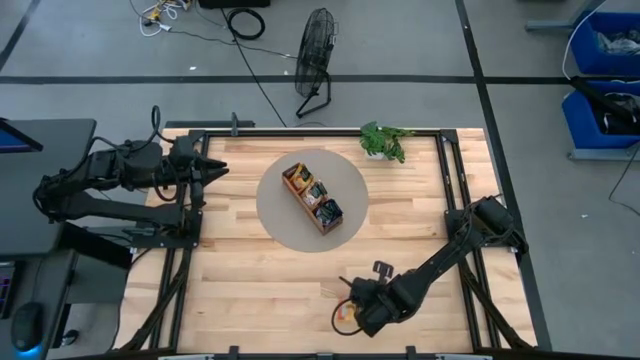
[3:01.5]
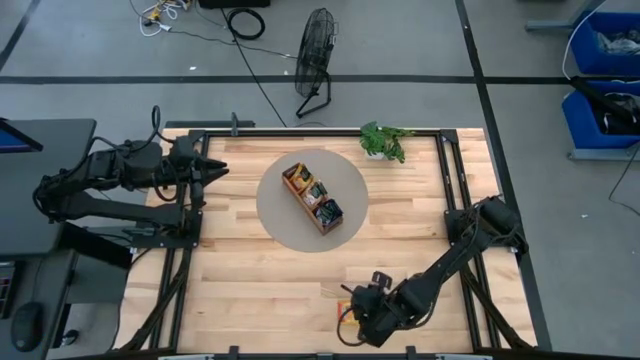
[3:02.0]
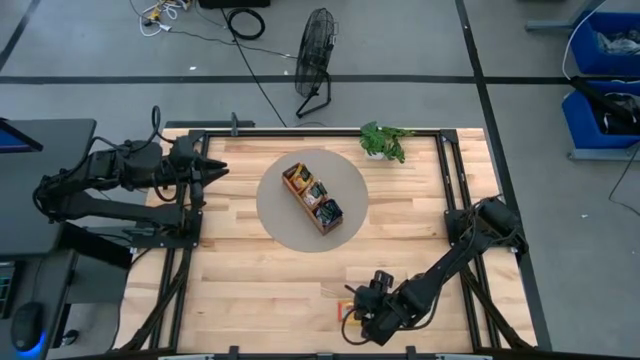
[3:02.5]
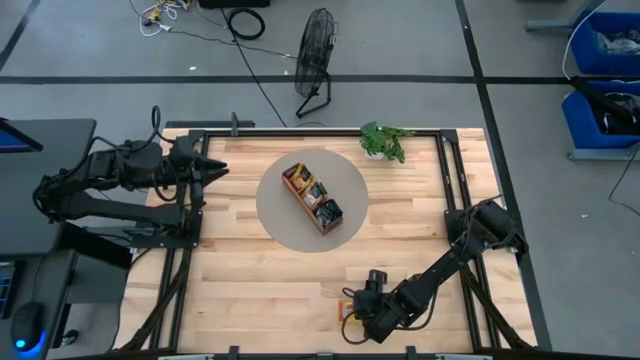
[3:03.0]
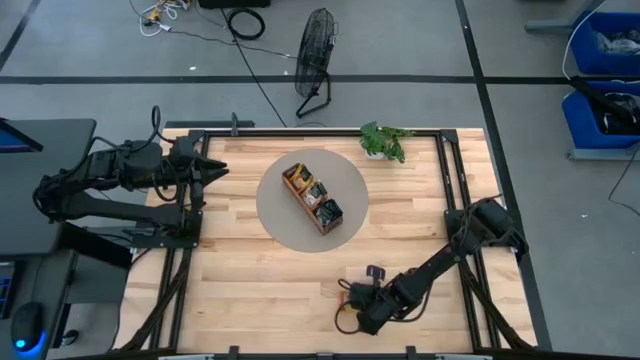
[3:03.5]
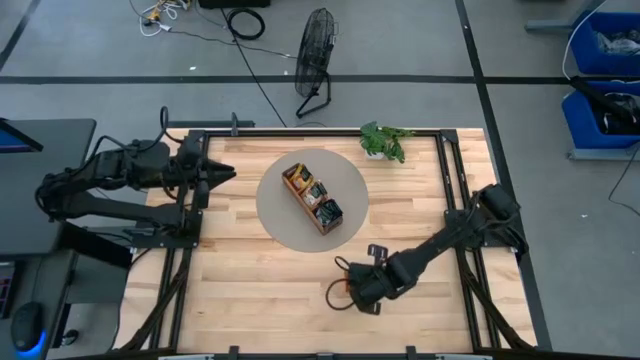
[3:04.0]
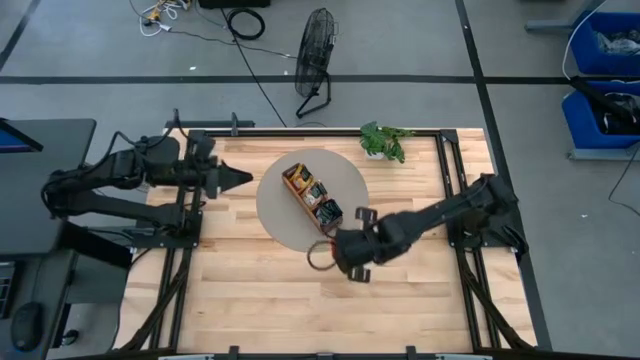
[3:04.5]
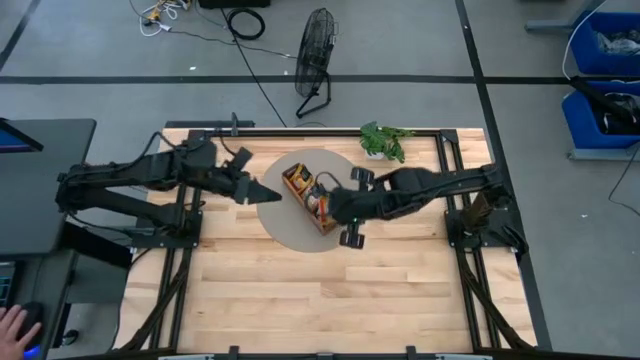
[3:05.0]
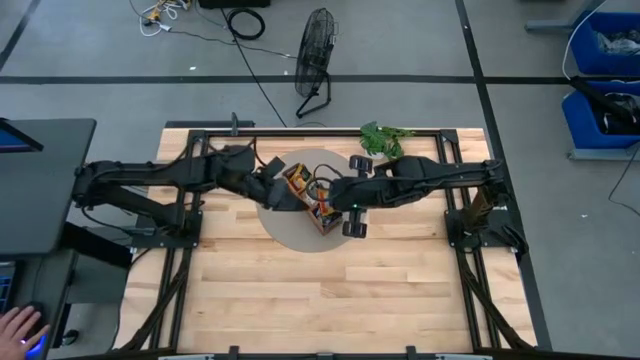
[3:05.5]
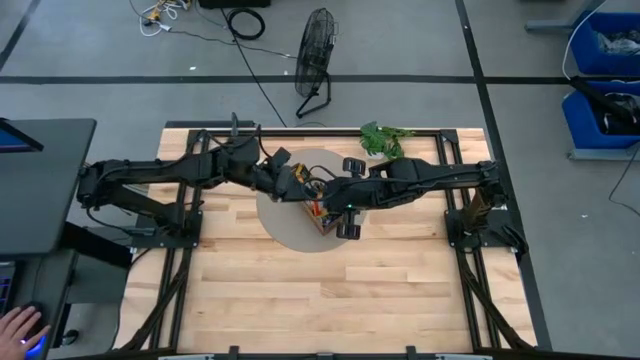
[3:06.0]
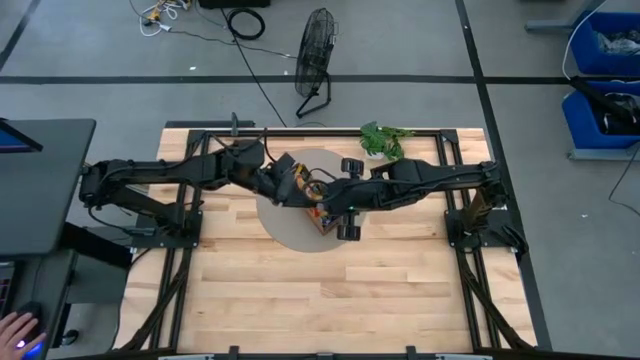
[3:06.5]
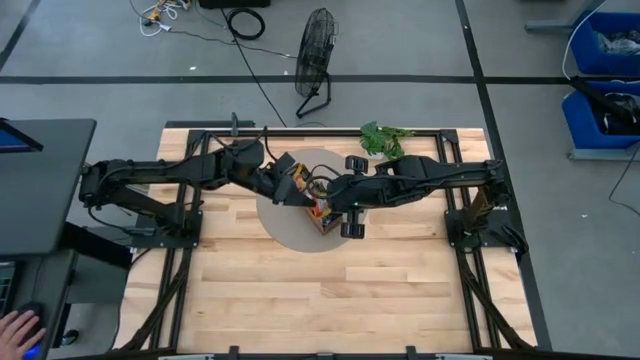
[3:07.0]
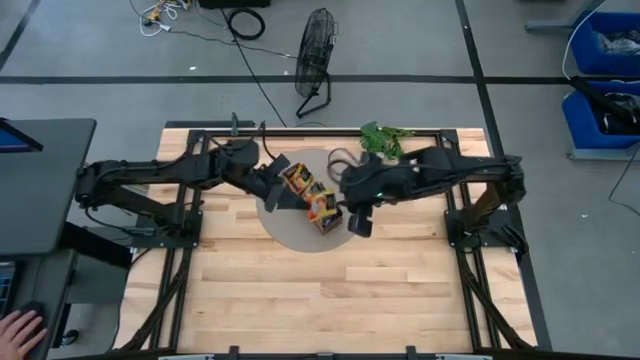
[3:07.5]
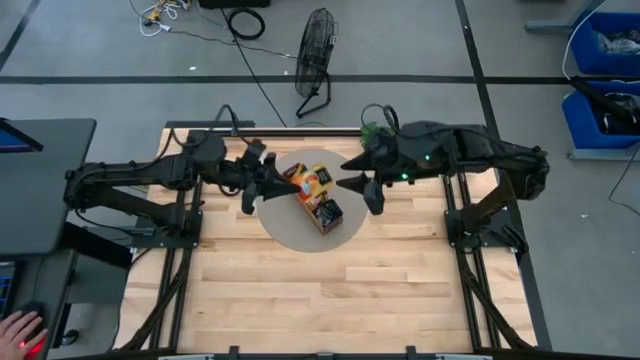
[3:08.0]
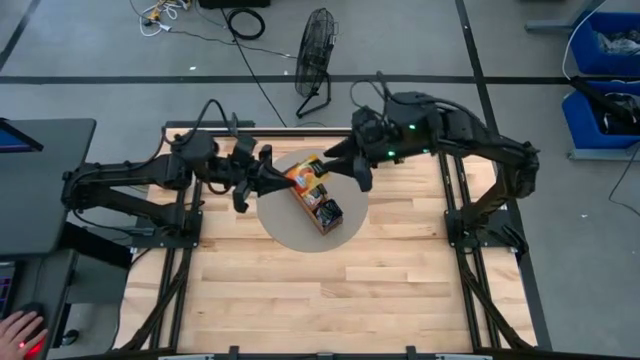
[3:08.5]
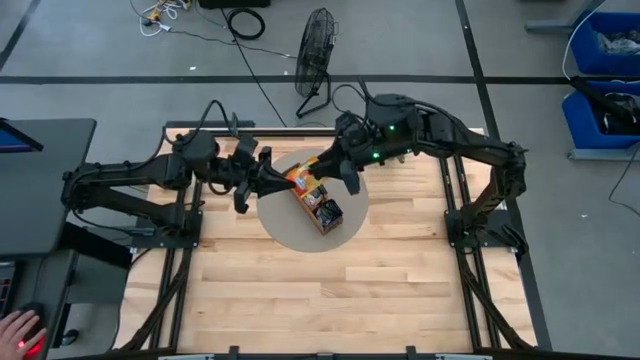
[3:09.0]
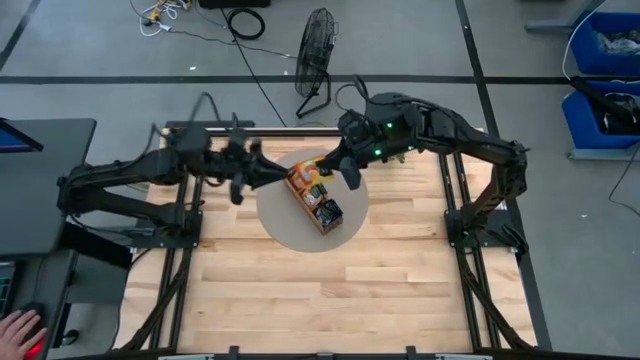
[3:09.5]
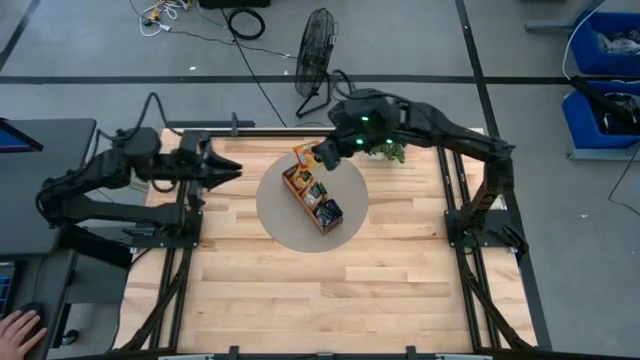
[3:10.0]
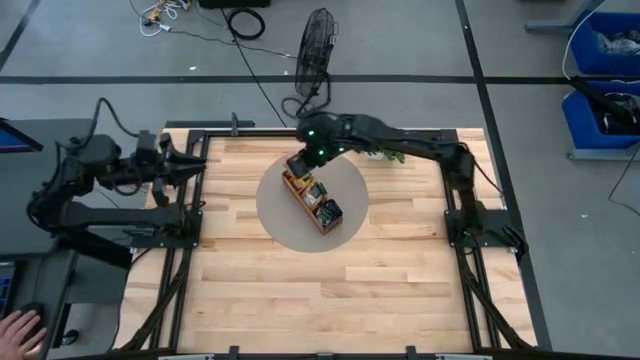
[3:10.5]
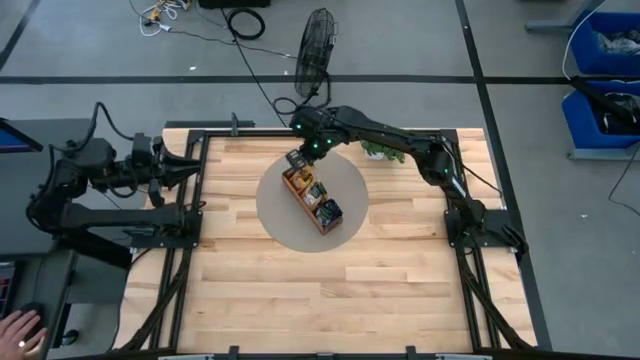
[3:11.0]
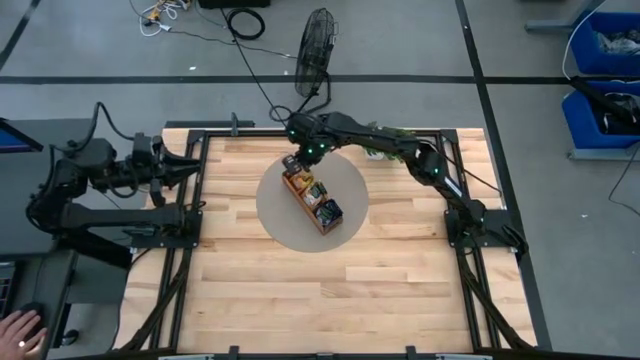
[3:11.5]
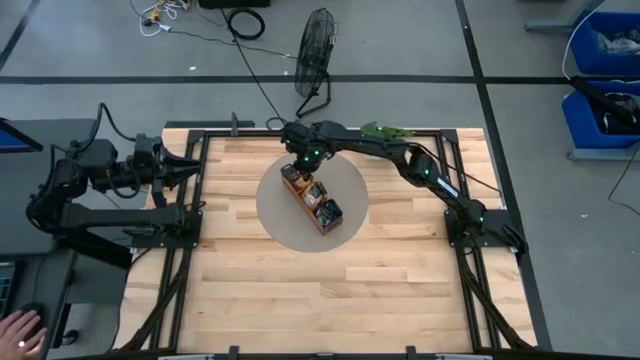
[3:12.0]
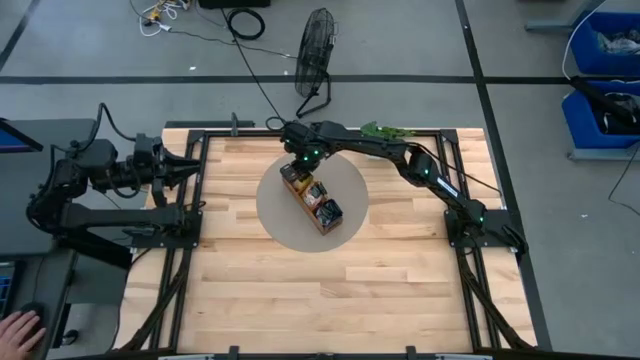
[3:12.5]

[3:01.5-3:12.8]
Task: Pick & Place Tea
Put the yellow tea bag into the left section of the wooden organizer

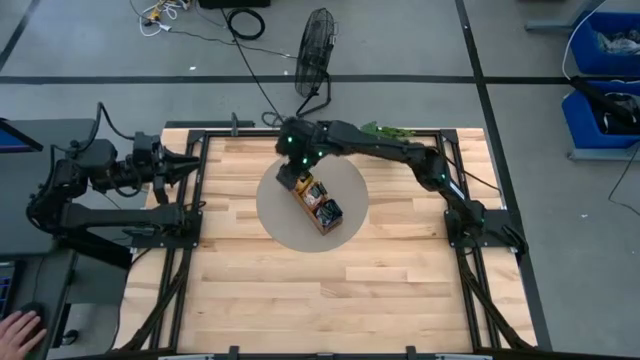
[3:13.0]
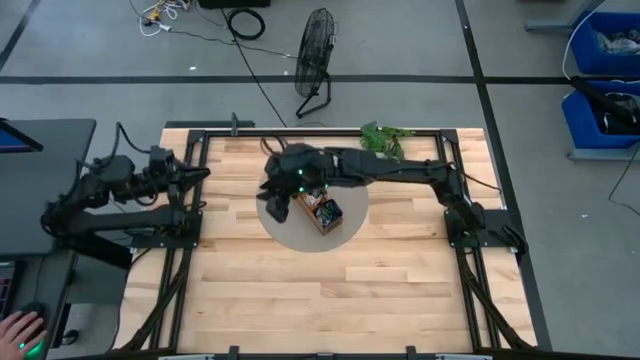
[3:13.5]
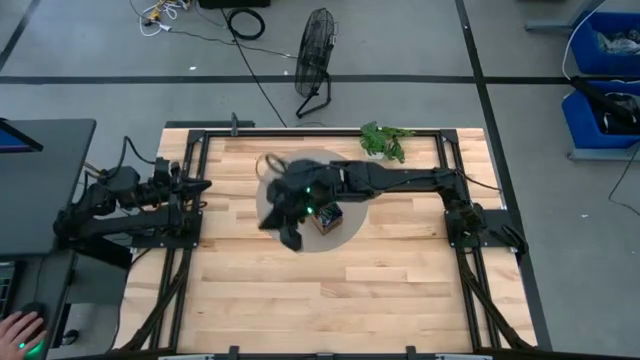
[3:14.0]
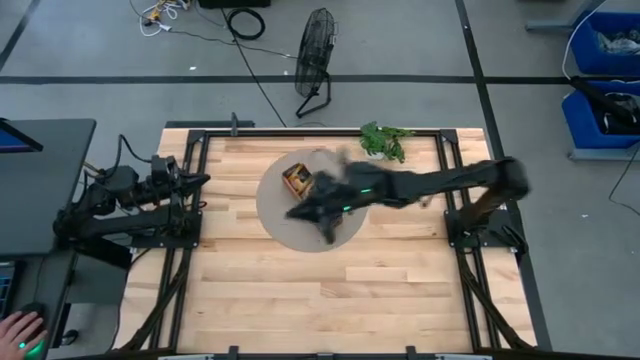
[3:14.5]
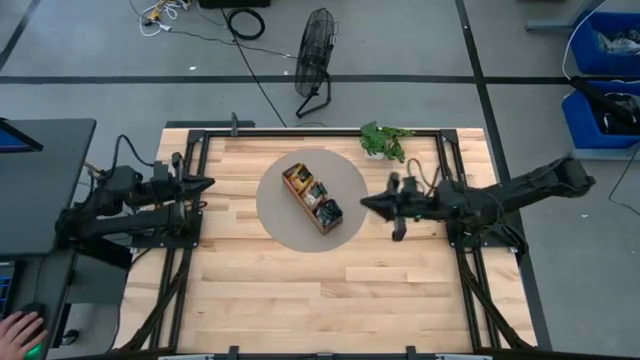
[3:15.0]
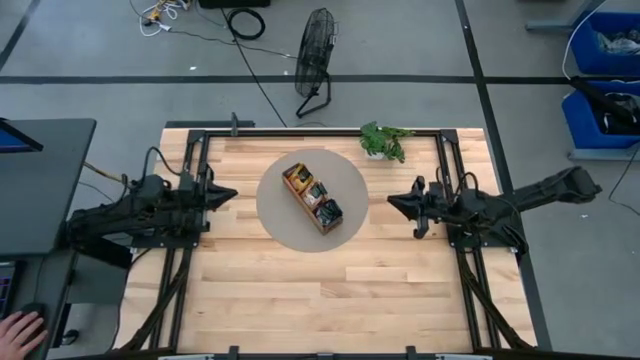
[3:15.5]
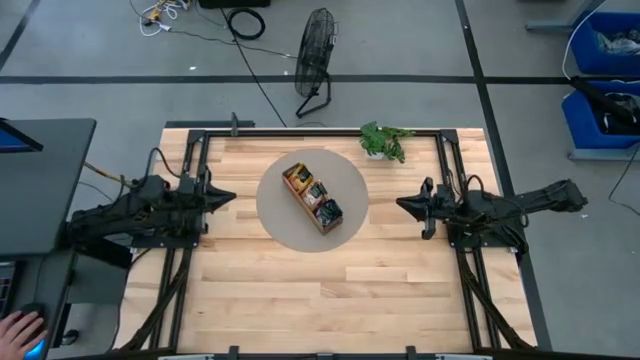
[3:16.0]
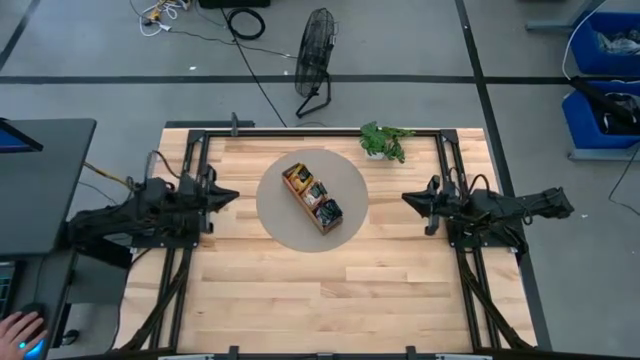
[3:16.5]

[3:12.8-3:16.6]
Return to Home Position

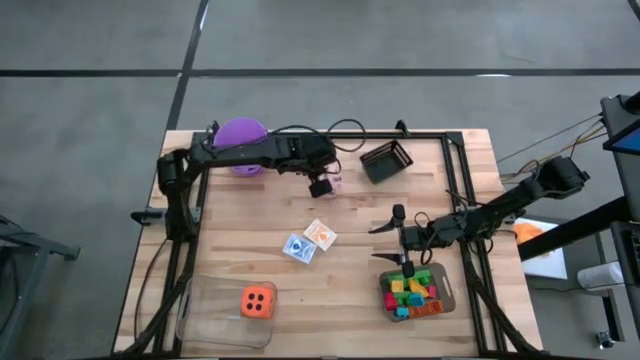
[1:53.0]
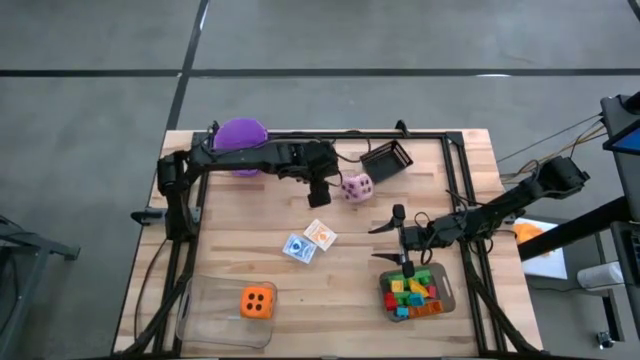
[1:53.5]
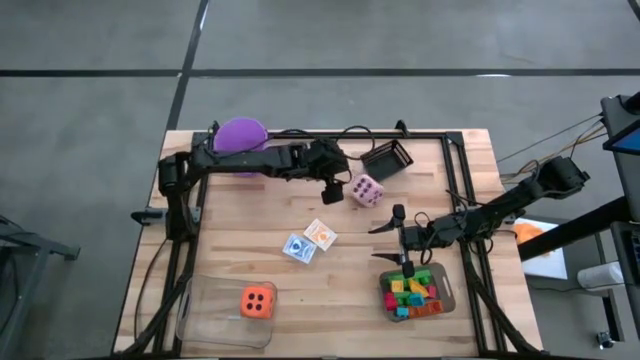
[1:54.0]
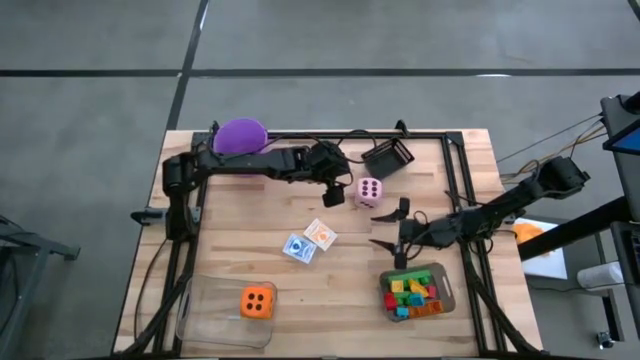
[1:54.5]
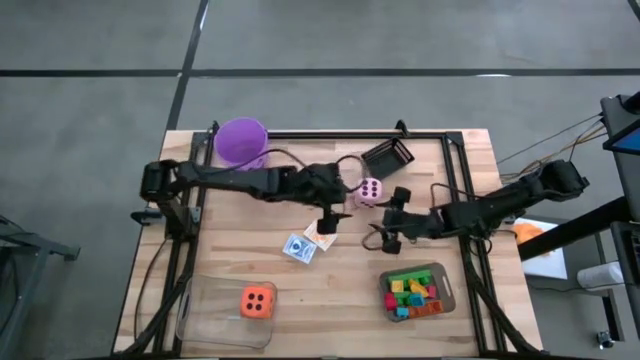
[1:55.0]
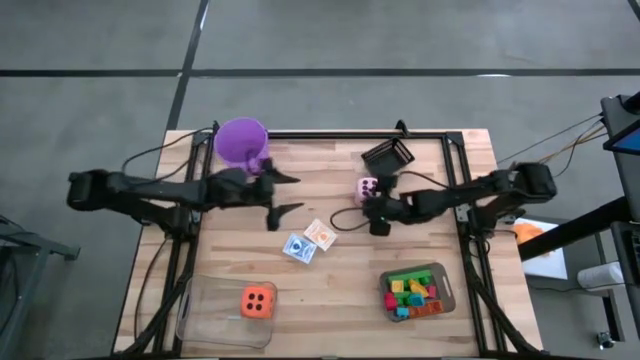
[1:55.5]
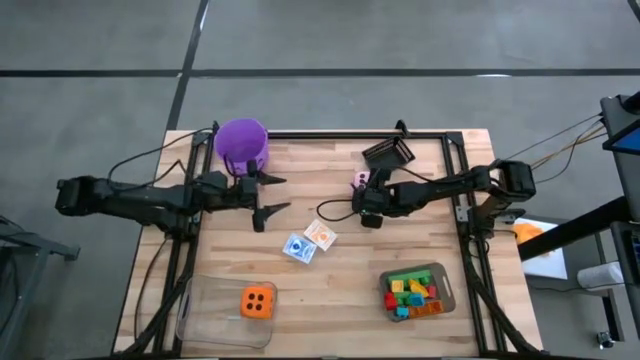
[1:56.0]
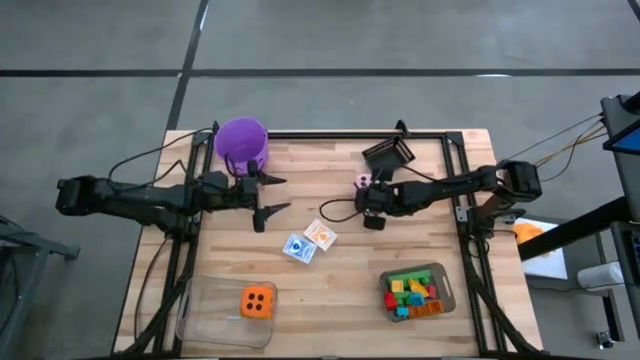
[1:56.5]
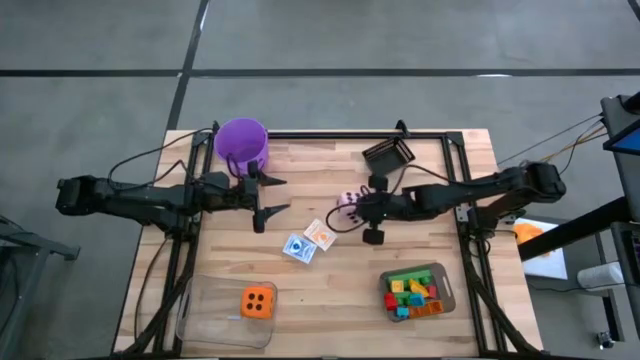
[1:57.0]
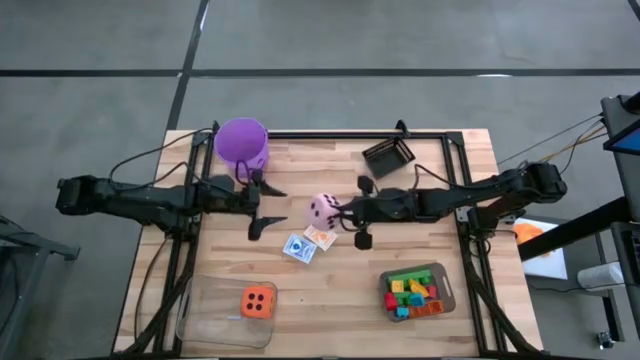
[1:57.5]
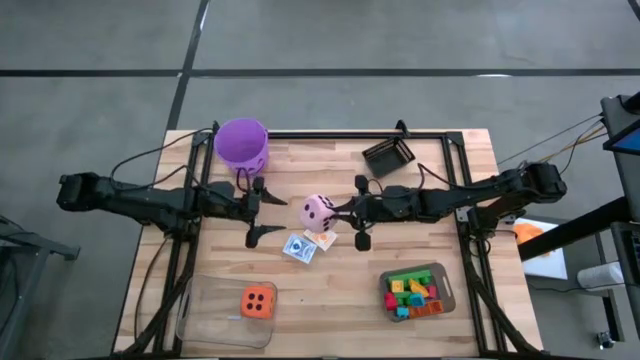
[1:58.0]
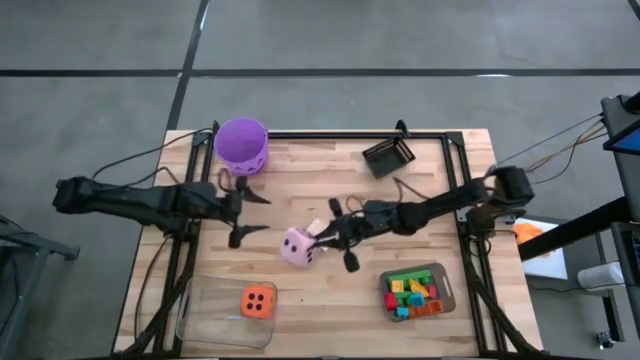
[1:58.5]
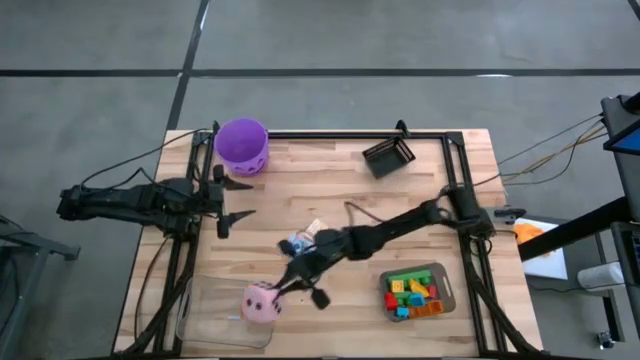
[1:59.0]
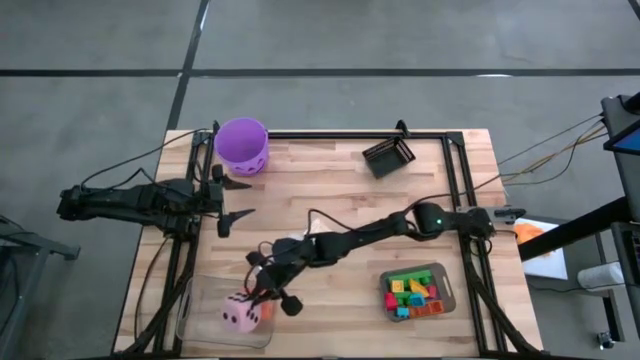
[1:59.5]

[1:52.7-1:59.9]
Task: Pick & Place Toys
Put the pink dice into the transparent bin
